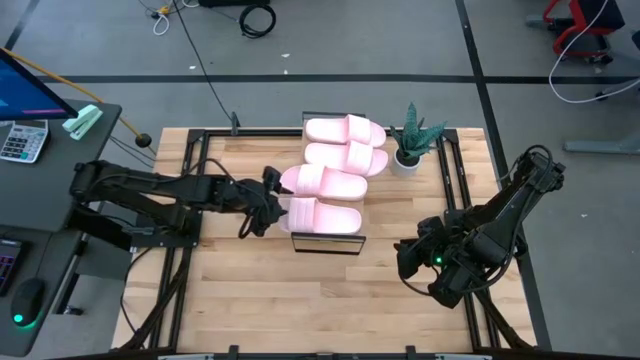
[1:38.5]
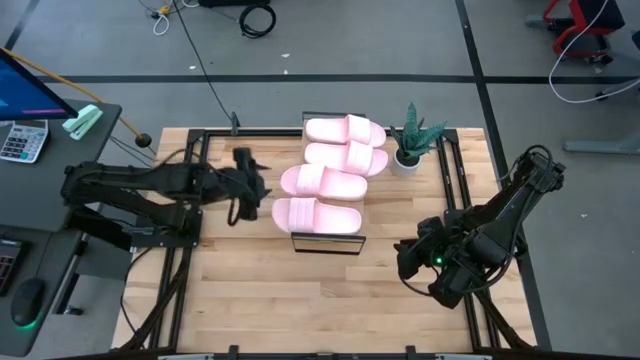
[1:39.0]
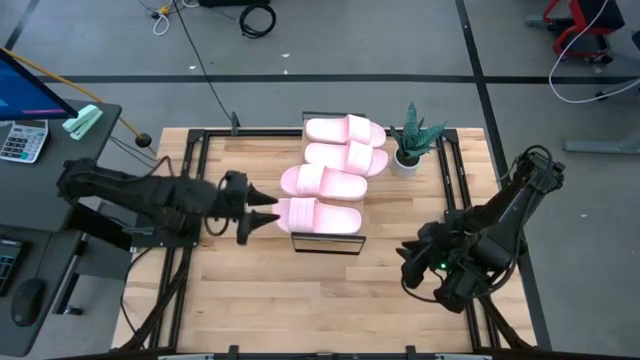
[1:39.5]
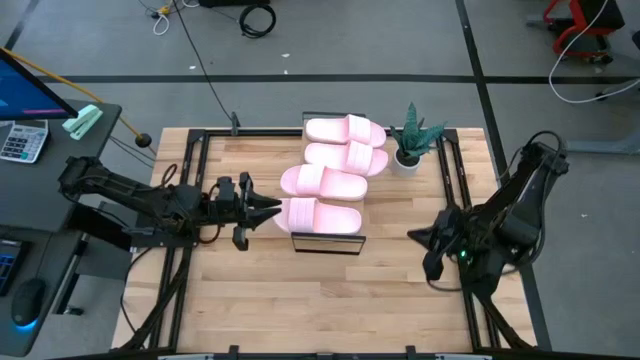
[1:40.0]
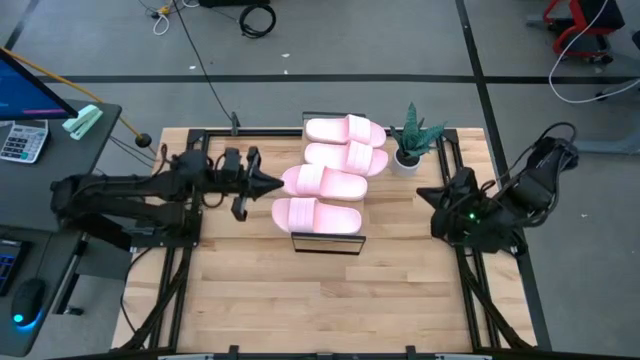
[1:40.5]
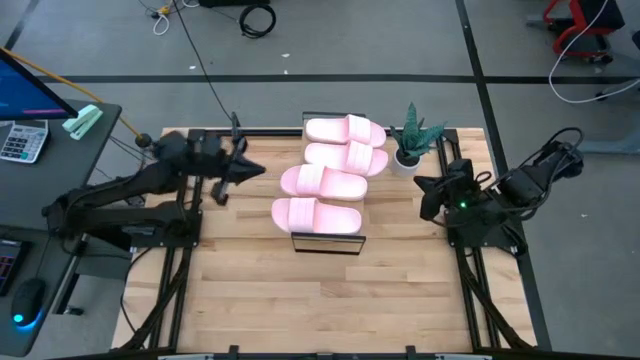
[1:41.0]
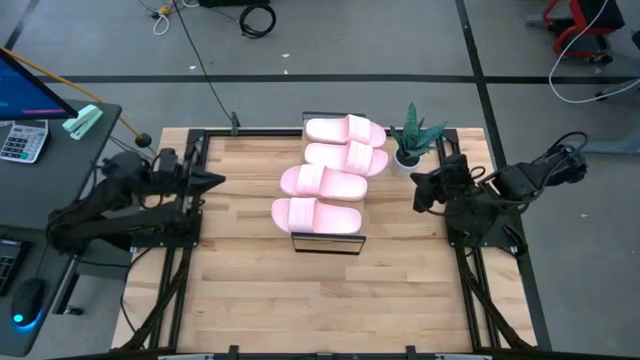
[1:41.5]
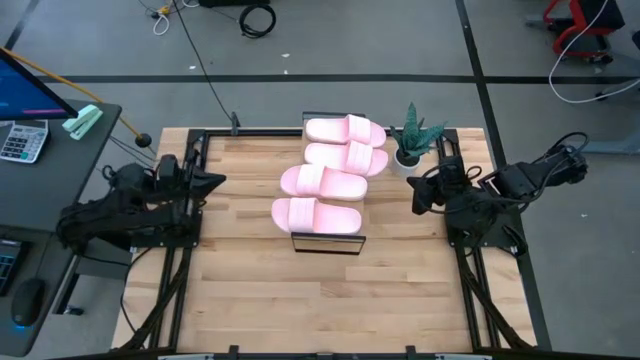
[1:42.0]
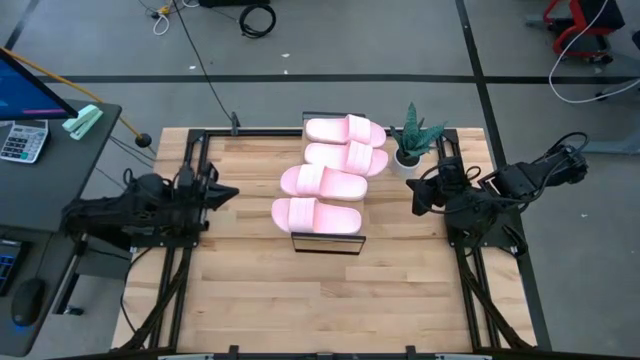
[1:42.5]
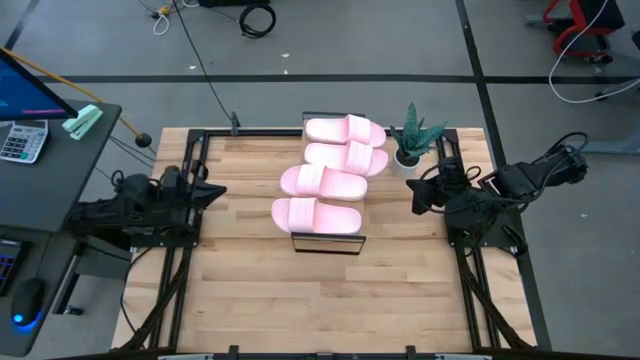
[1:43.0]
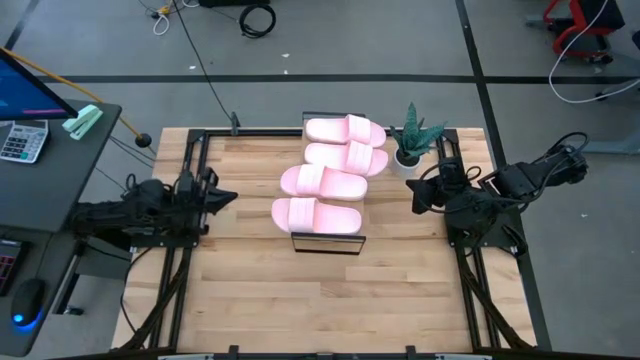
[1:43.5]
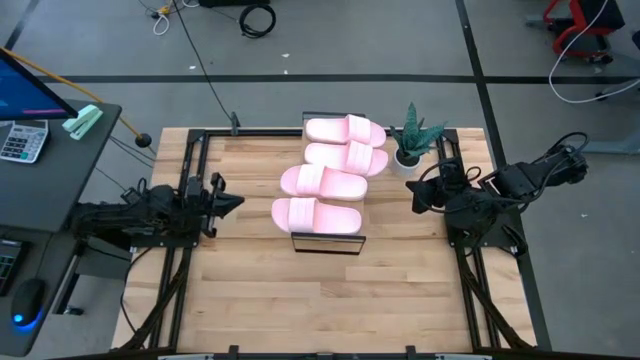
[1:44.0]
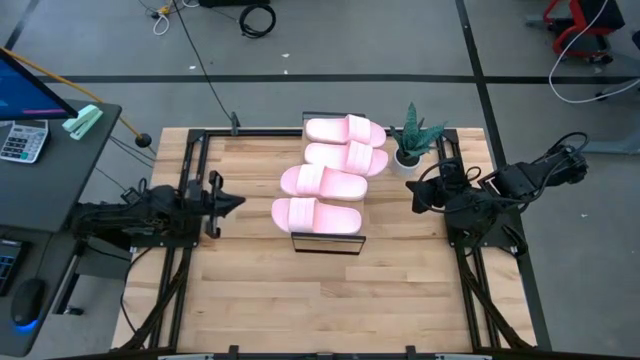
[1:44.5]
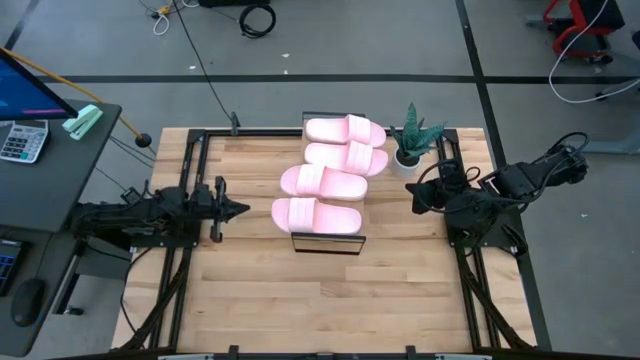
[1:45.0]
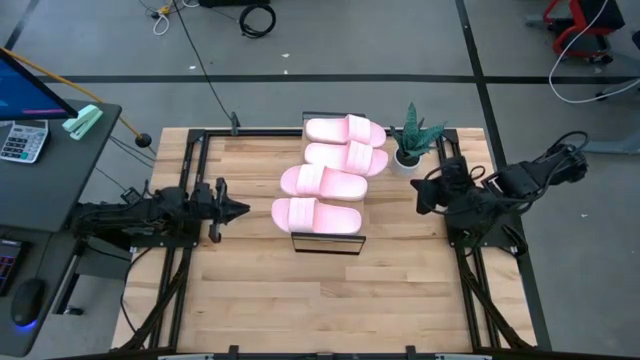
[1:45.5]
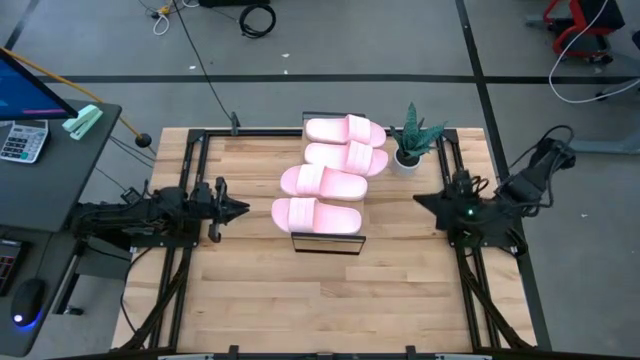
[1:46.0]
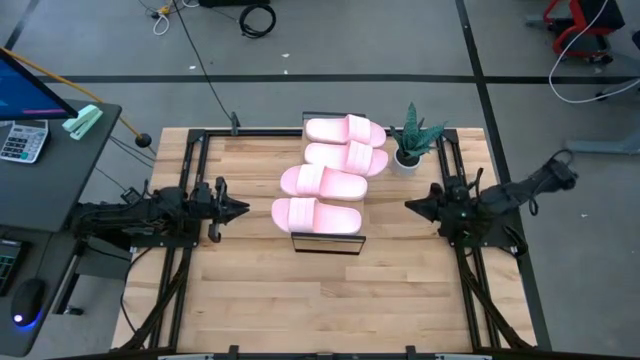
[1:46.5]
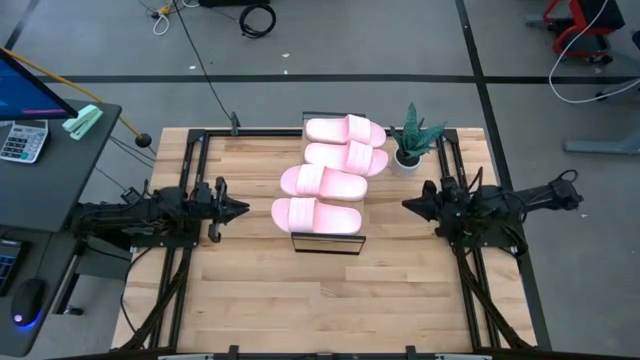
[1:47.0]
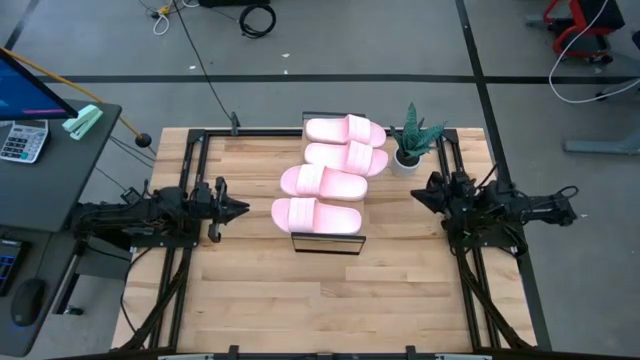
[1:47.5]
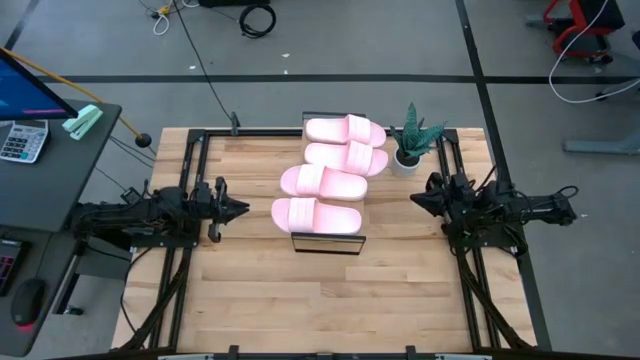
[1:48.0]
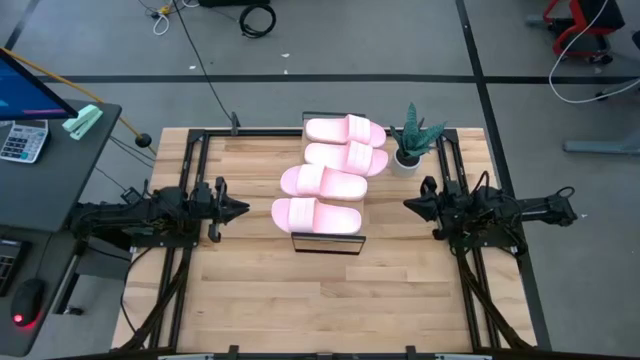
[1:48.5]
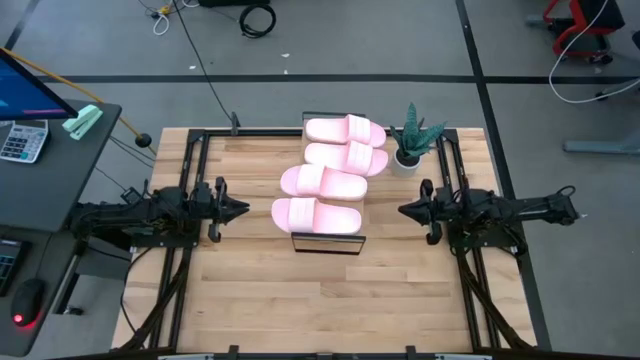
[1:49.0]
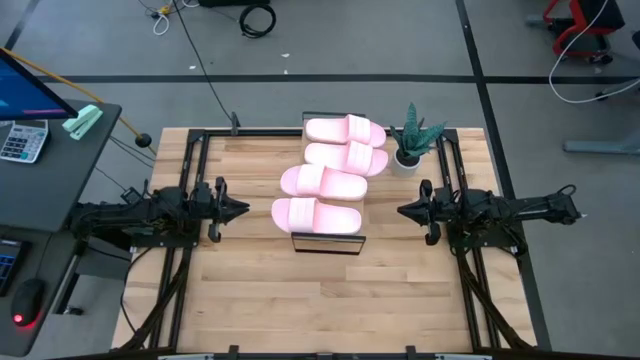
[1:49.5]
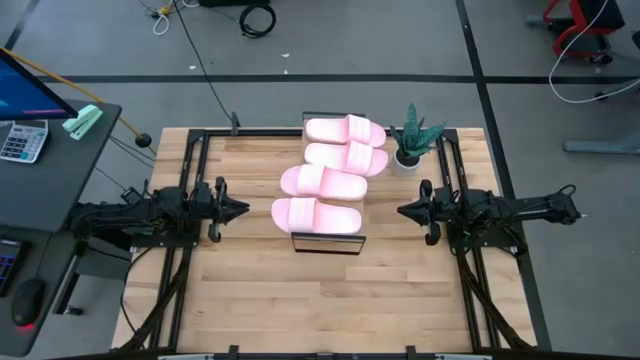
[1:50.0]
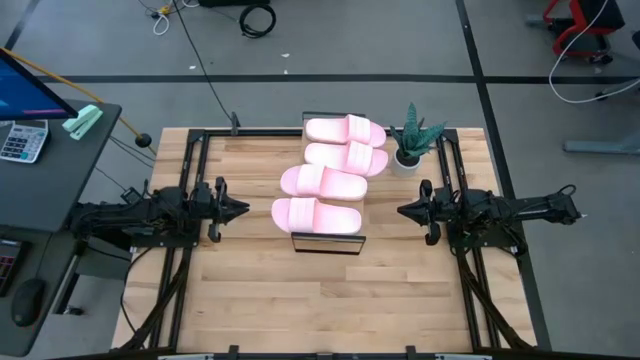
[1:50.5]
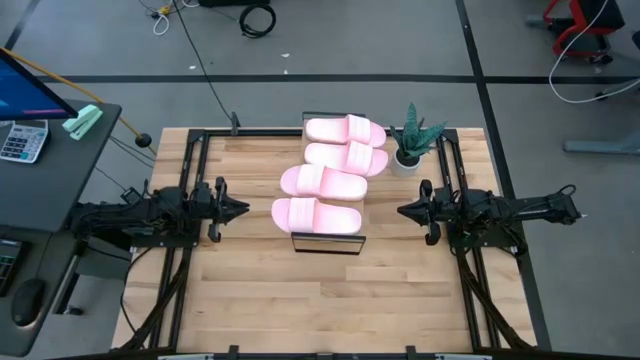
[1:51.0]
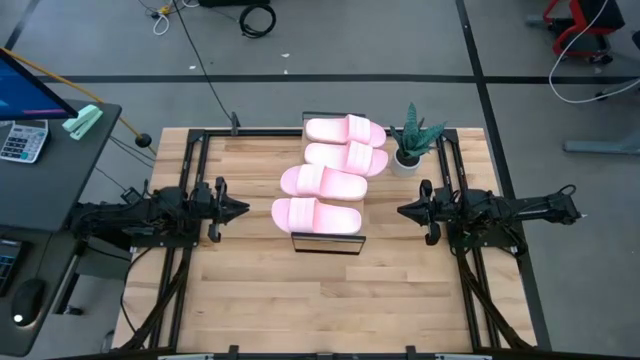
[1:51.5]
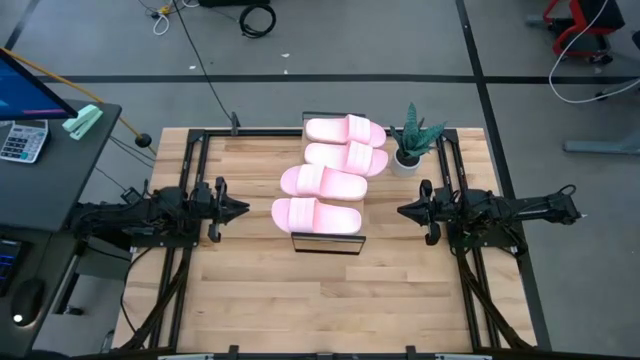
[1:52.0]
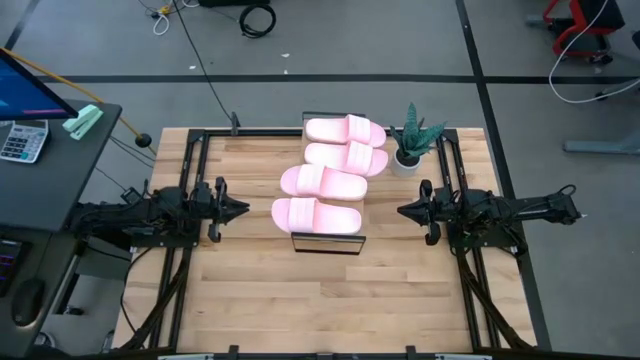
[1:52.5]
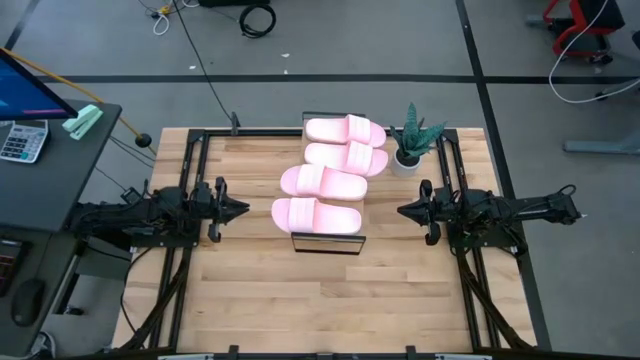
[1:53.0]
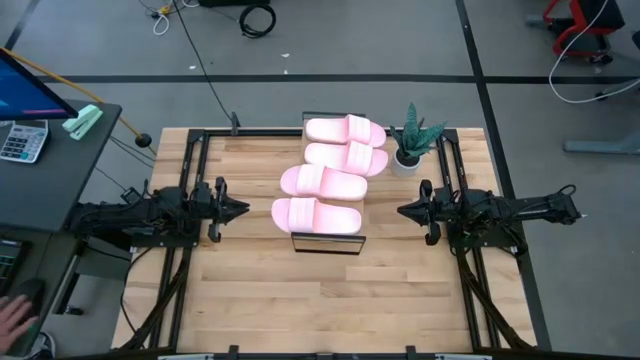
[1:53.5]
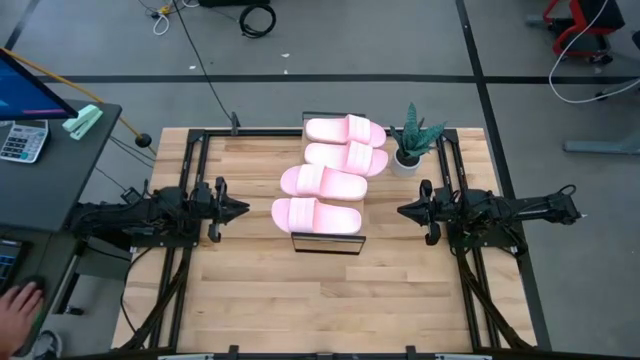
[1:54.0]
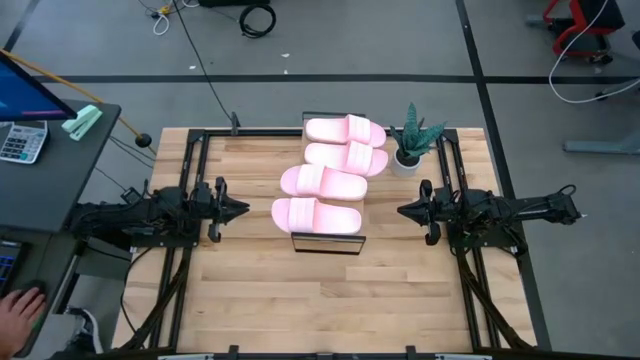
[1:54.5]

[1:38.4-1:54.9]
Task: Pick and place slides into the shelf
Return to Home Position

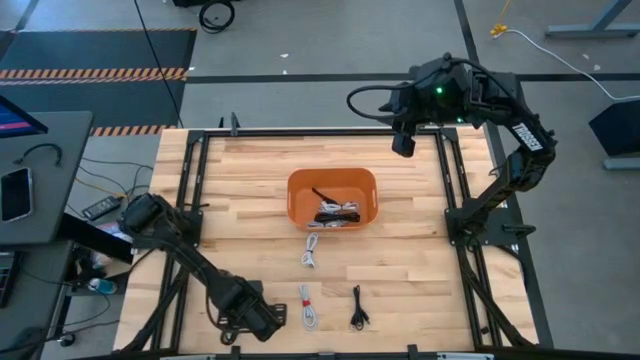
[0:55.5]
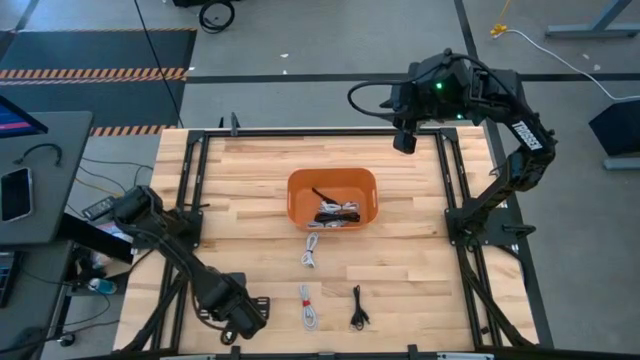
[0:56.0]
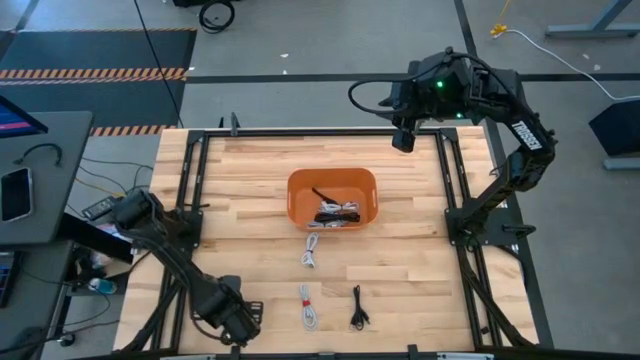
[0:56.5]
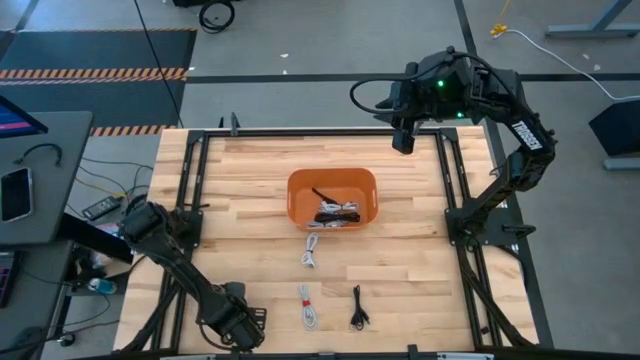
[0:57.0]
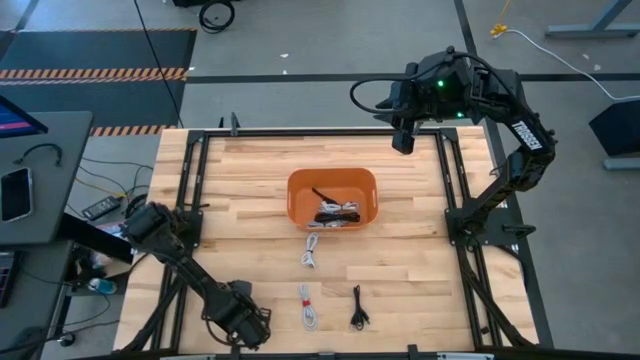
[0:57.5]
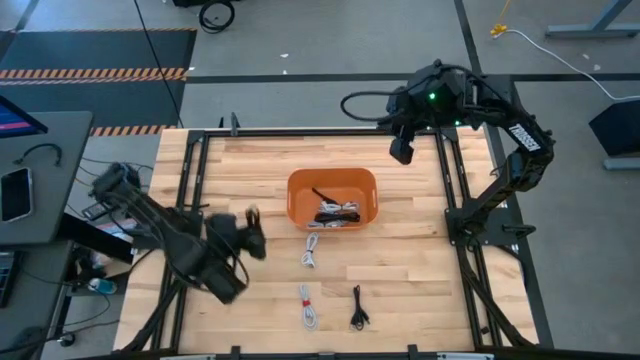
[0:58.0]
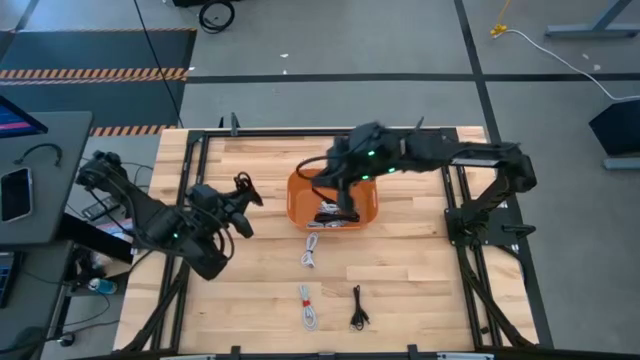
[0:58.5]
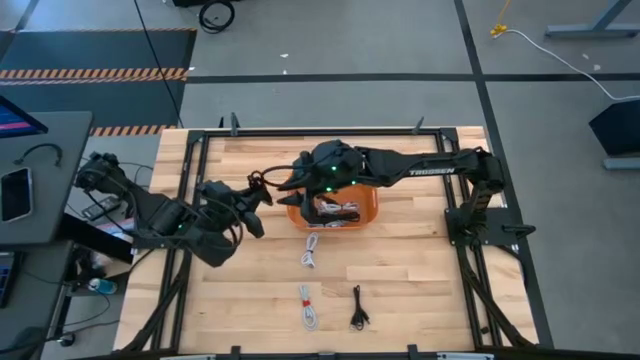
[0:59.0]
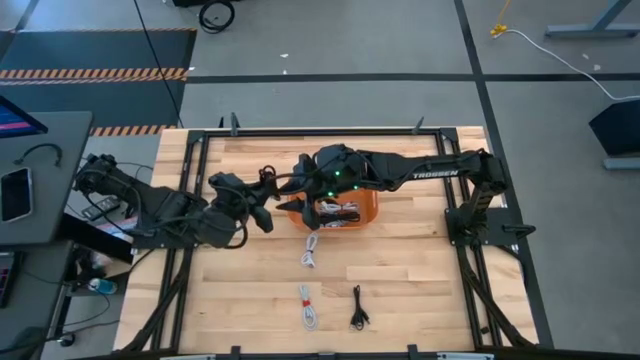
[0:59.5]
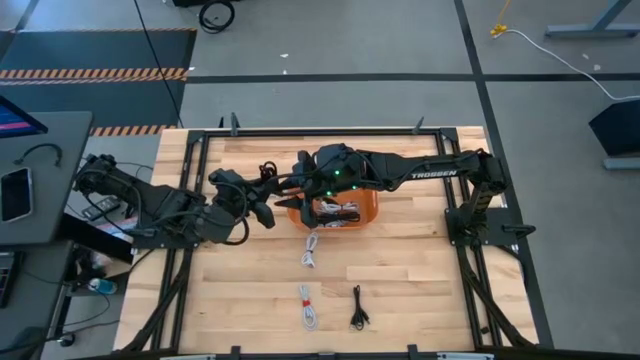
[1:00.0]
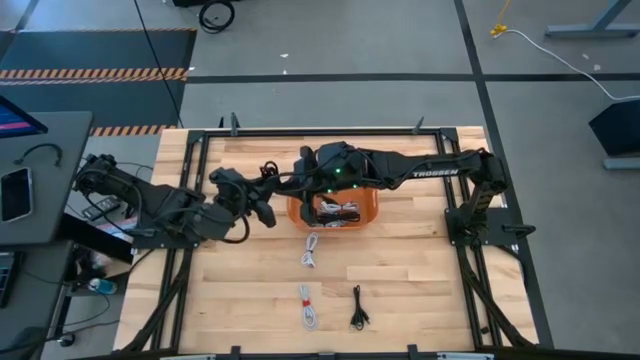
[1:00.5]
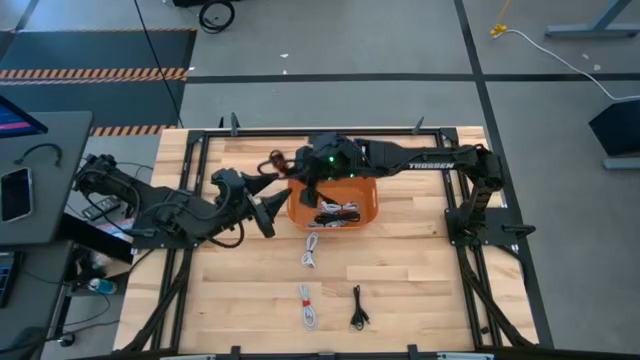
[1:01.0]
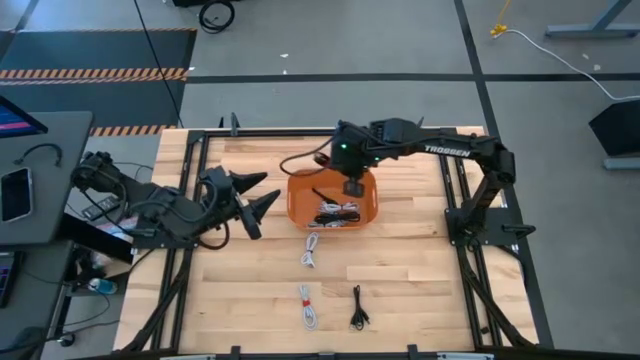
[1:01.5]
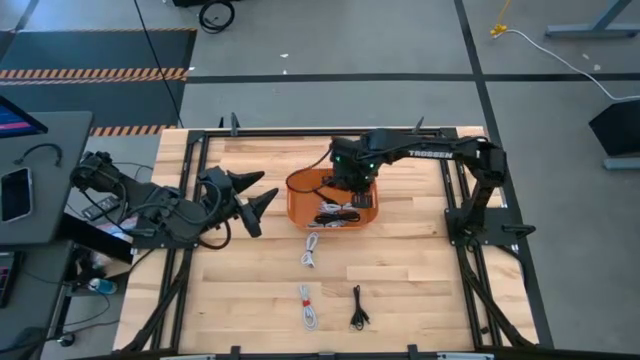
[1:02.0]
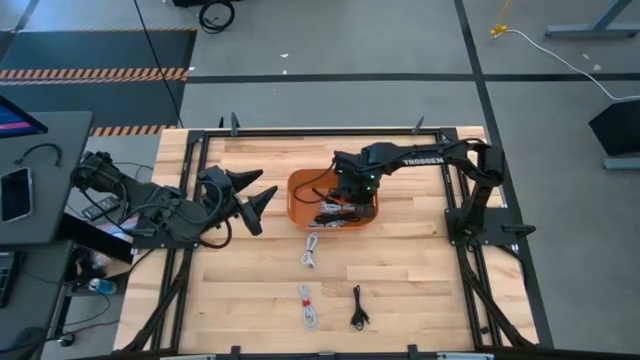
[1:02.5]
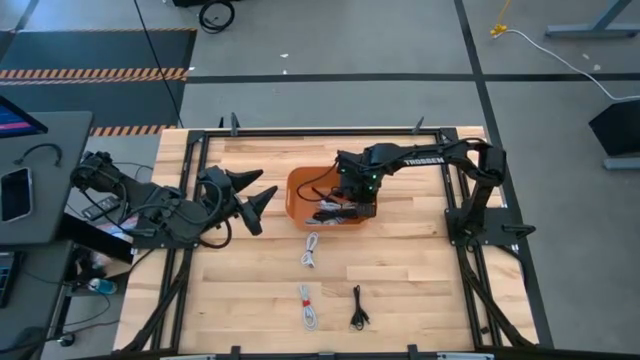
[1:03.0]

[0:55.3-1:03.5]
Task: Pick and place USB-C Cables
Put the black USB cable into the orange bin
